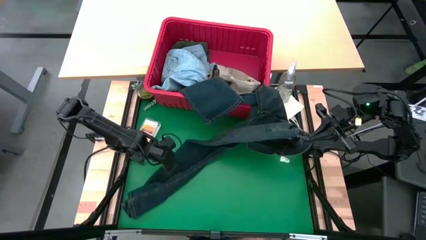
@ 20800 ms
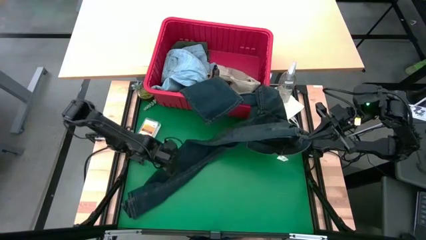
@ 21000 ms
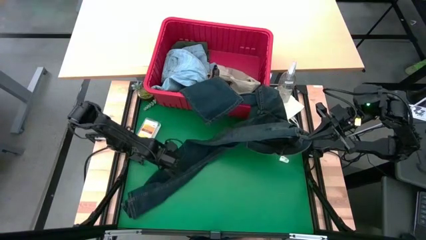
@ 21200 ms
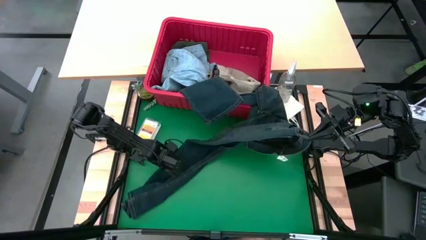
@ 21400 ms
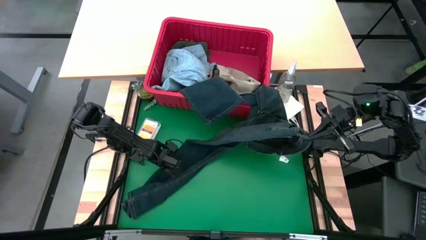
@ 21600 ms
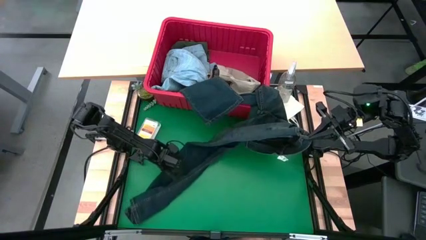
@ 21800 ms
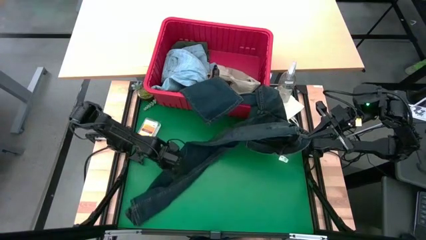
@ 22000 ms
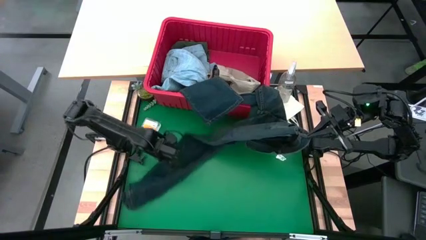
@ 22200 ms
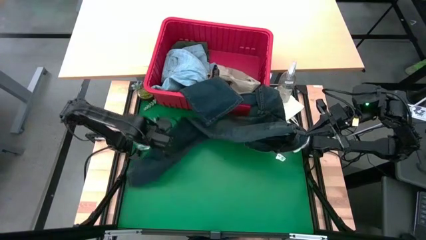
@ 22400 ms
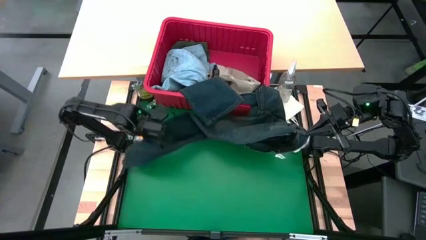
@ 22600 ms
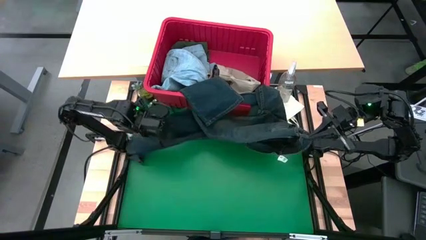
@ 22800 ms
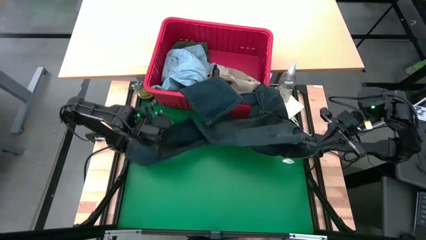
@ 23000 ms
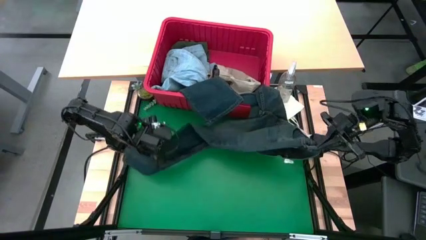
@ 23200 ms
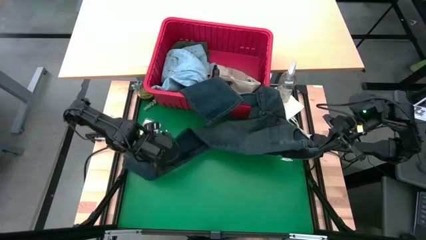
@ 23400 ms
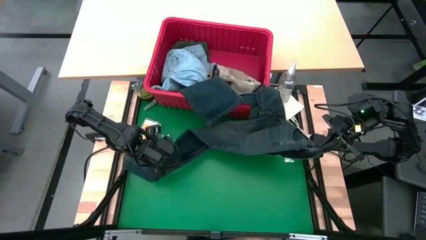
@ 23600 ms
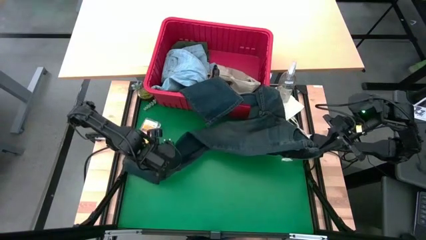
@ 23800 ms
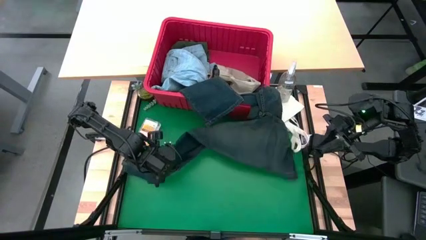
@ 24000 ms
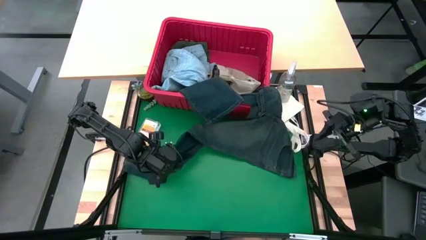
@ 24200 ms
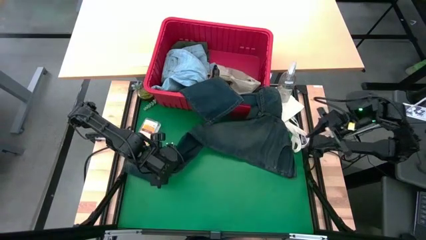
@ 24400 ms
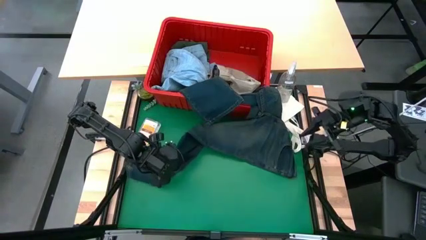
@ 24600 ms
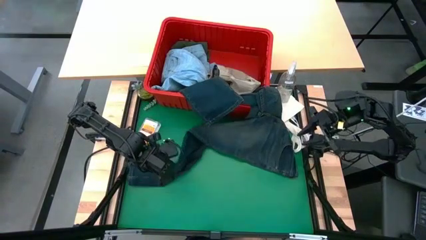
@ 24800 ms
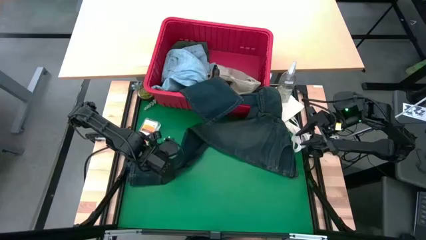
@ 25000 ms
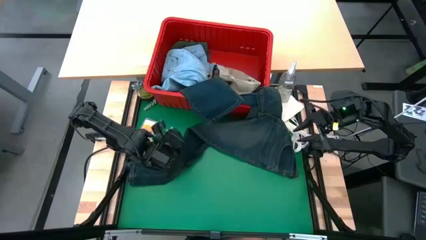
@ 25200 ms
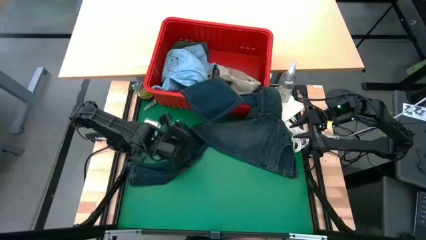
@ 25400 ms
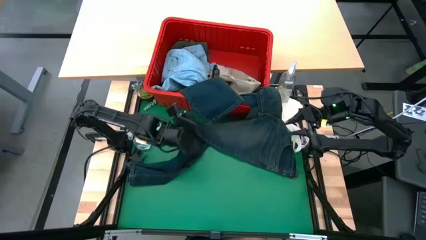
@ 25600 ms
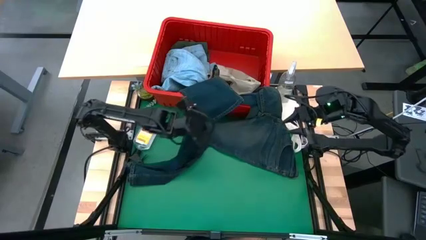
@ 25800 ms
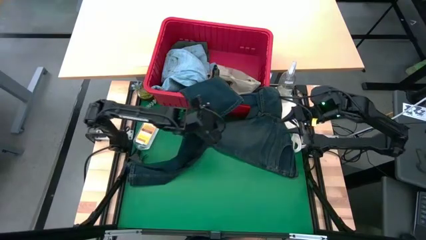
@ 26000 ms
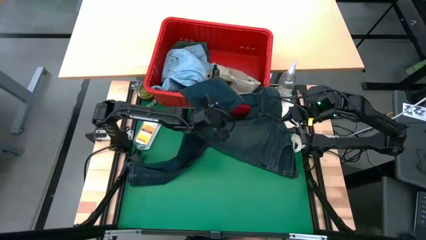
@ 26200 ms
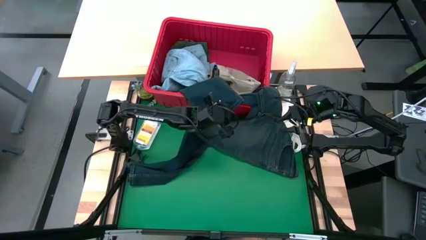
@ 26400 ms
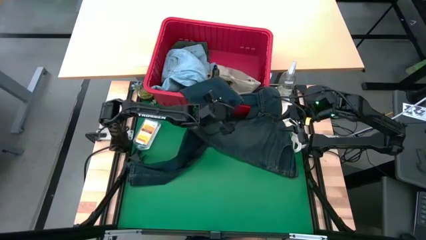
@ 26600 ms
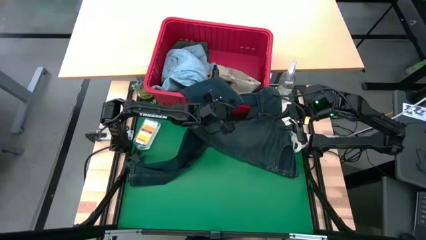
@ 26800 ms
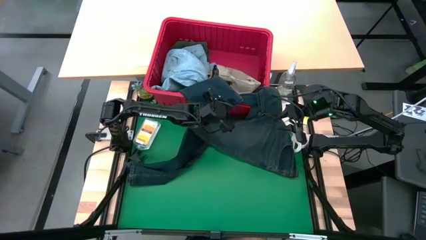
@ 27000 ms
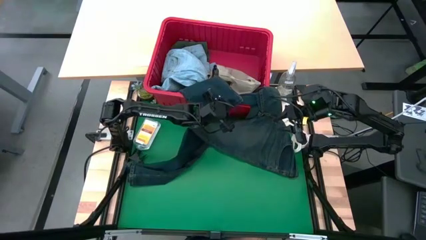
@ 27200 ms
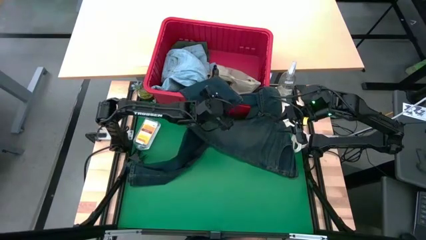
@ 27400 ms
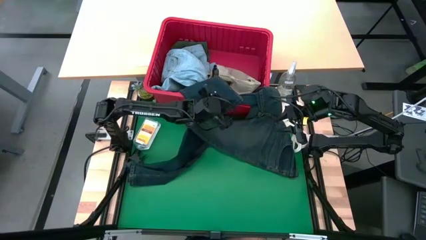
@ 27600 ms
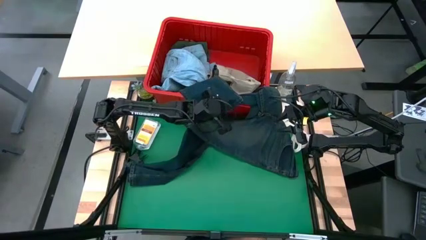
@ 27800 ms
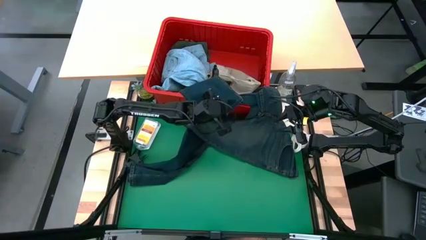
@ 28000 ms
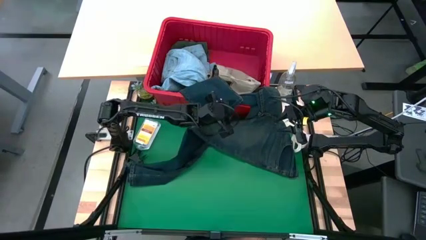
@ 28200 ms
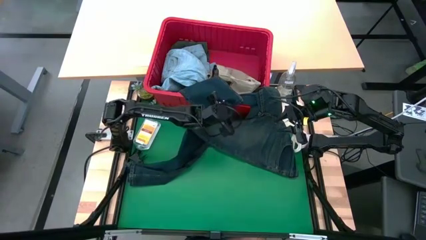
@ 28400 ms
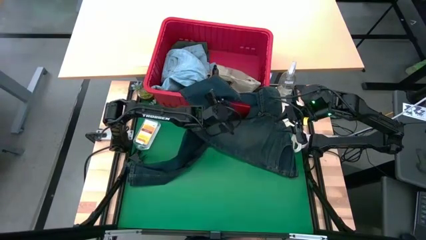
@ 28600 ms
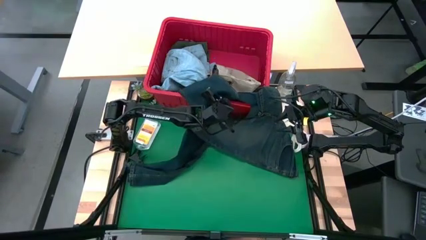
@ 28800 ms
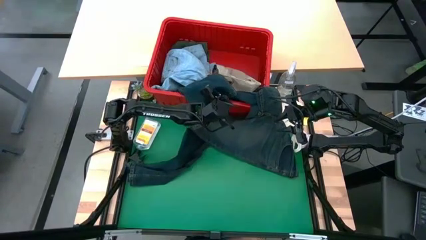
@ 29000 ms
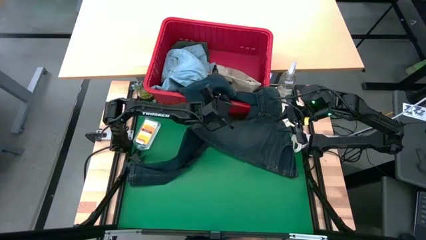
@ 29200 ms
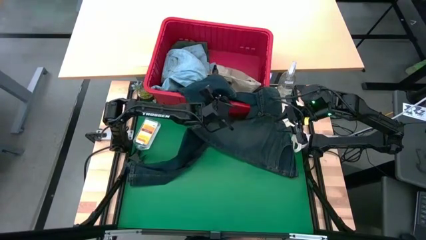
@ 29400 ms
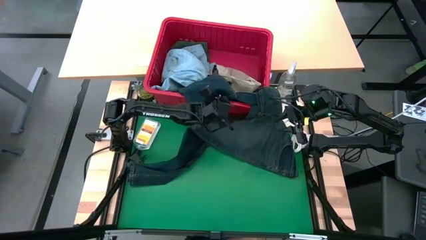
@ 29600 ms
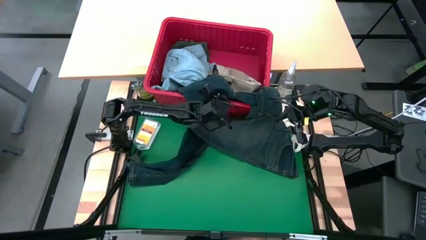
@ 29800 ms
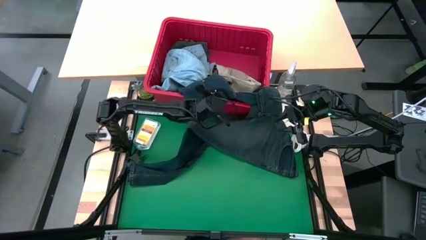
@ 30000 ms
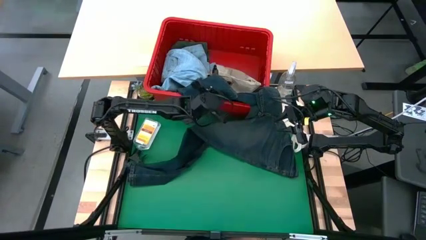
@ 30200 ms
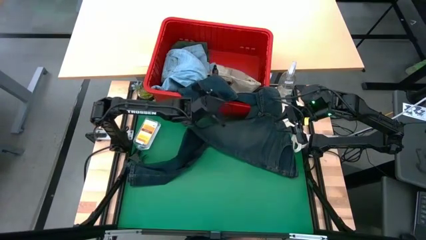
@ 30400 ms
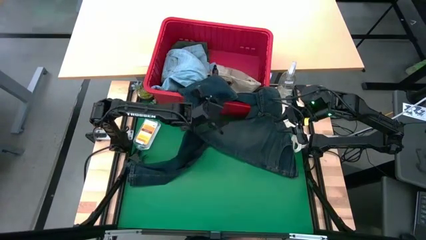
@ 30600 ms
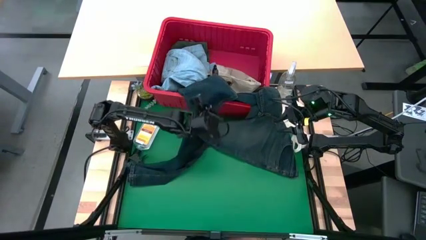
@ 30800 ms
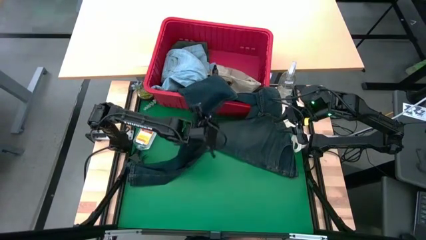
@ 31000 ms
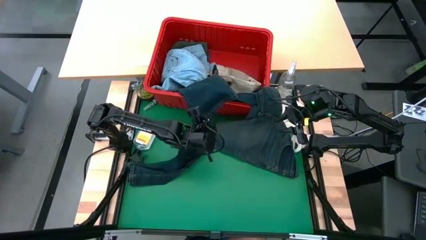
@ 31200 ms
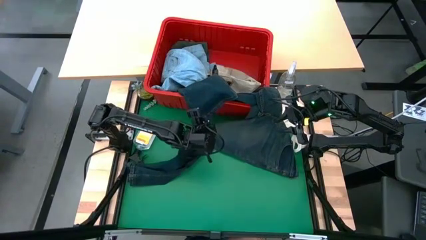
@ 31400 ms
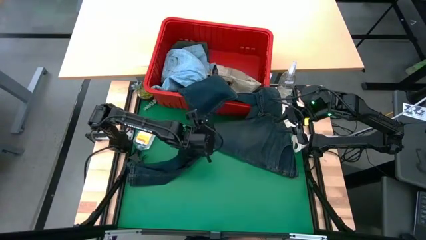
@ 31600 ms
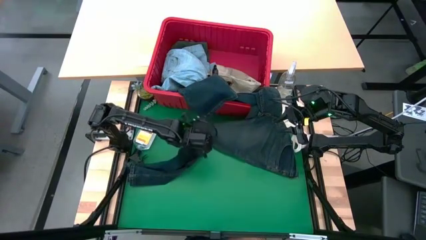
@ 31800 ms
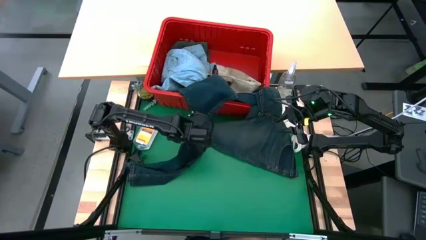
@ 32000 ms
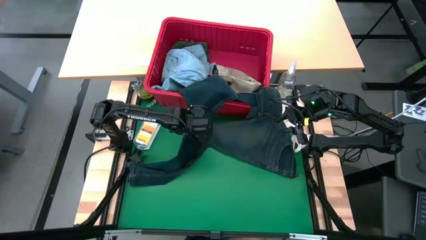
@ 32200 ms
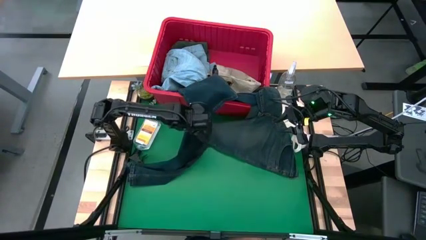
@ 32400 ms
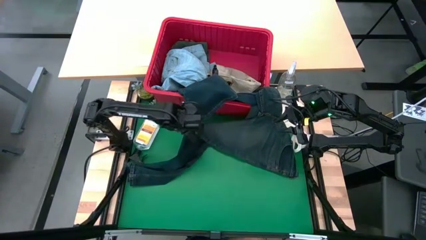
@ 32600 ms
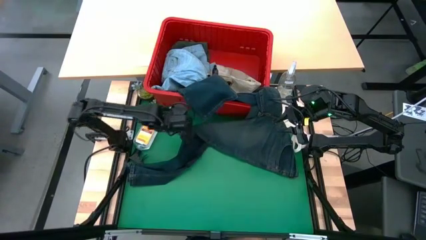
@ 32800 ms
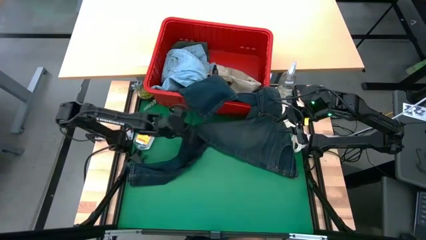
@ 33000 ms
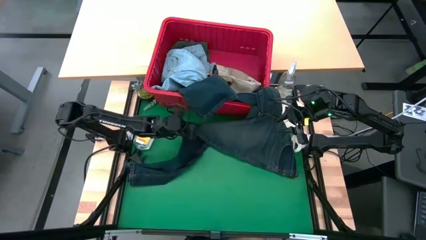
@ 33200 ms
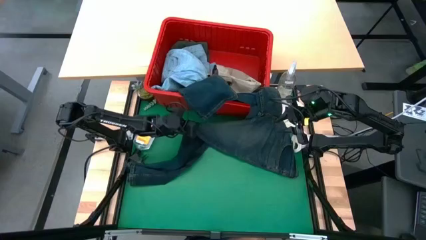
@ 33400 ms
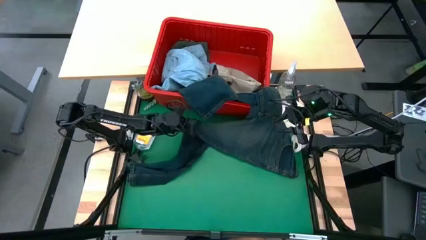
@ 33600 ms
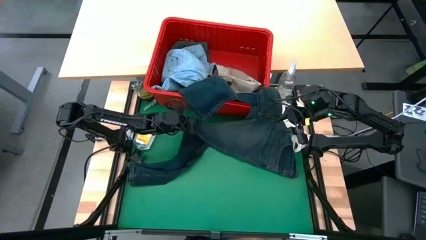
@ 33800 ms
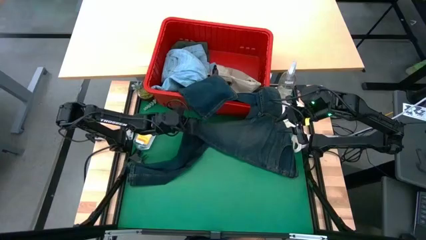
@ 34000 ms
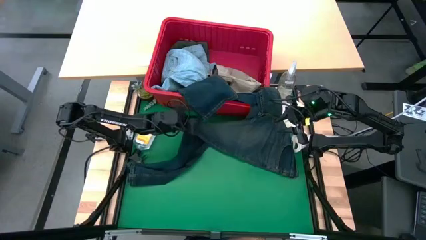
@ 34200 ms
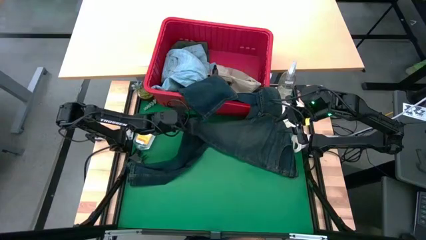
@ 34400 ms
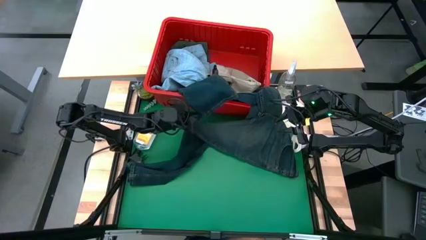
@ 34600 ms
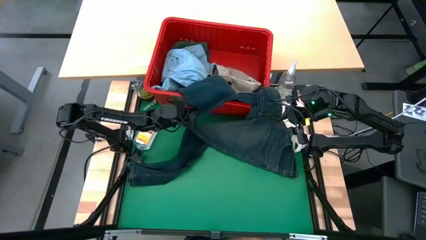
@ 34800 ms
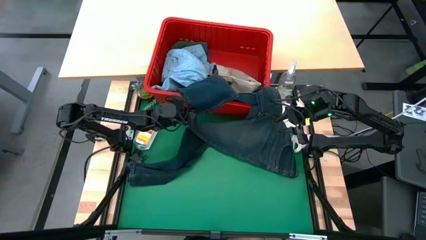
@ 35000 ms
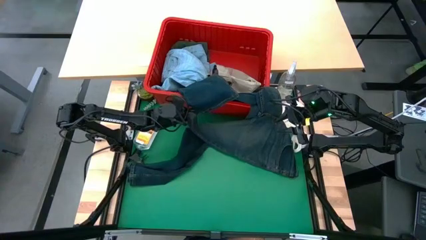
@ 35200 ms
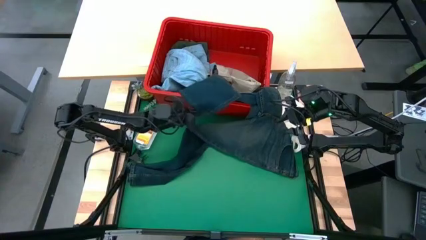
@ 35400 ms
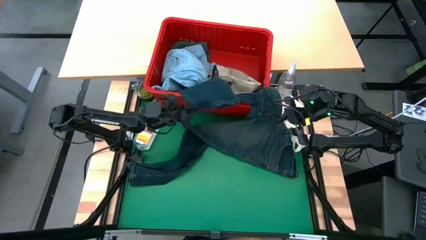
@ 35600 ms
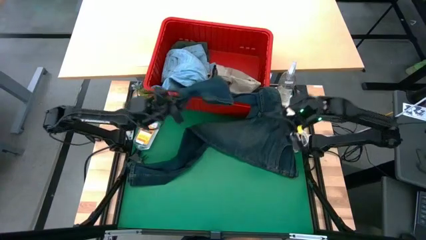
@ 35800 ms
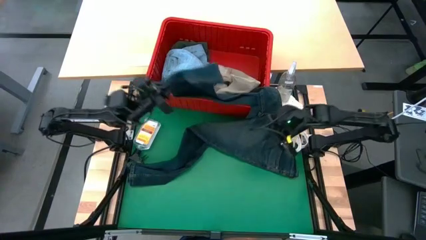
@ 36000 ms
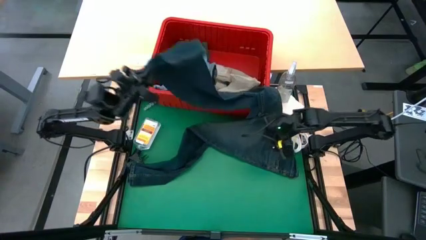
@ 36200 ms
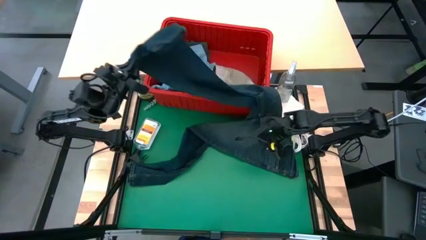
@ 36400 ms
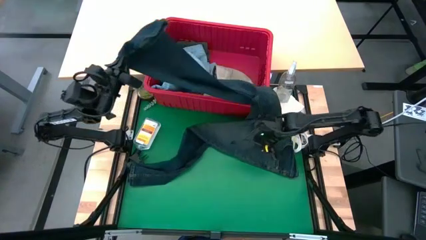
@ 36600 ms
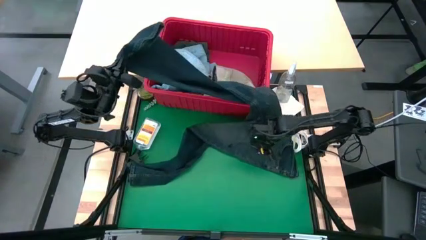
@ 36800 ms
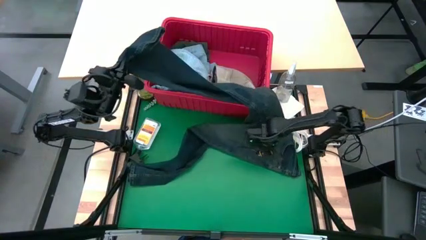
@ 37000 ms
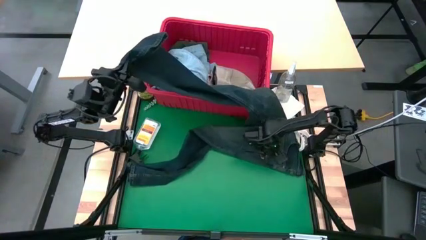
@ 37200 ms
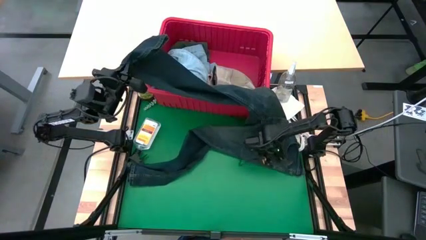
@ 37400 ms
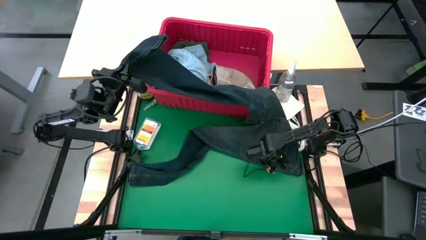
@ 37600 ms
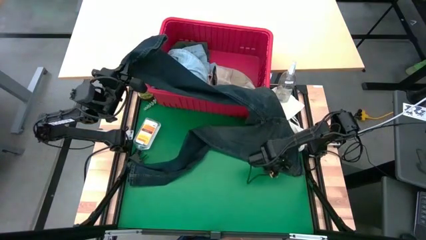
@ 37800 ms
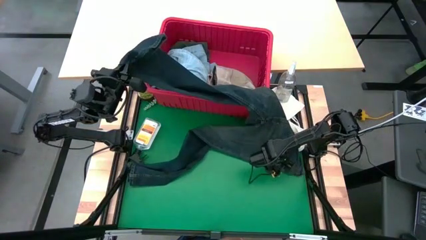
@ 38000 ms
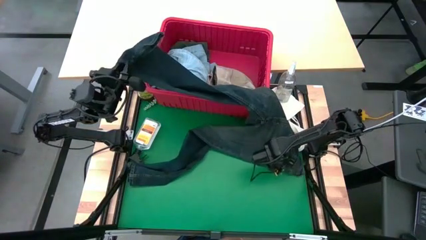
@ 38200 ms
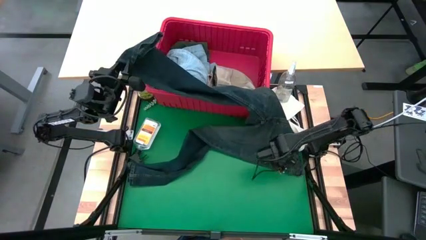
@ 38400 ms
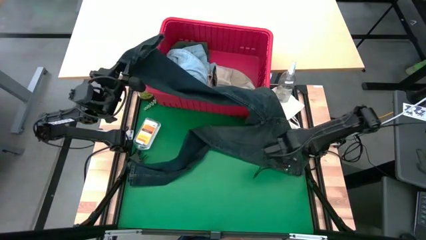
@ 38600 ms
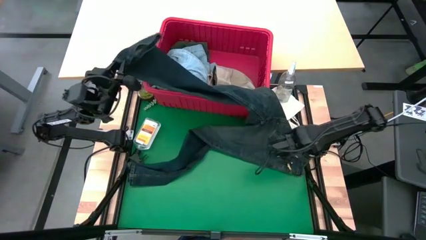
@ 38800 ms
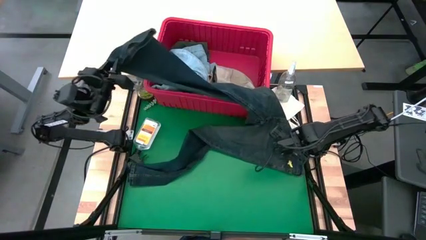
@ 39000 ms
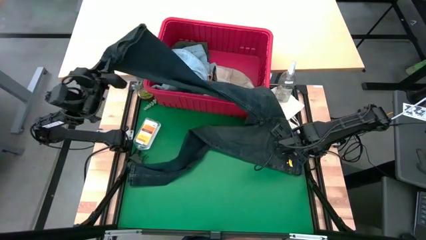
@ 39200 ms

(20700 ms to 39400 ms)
Task: Fold laundry
Fold the dark blue jeans
